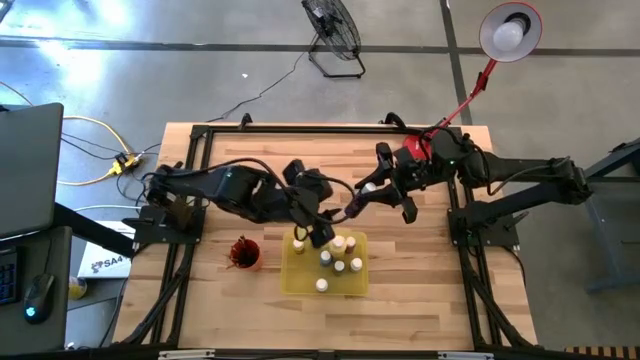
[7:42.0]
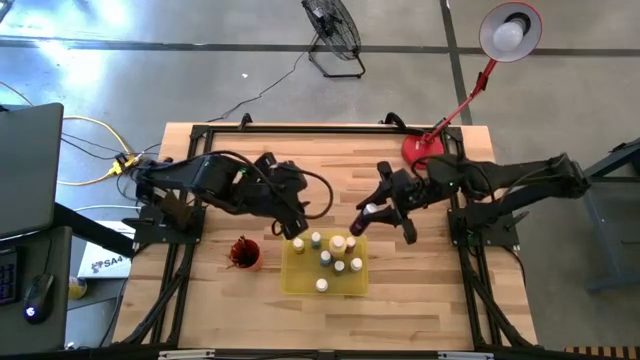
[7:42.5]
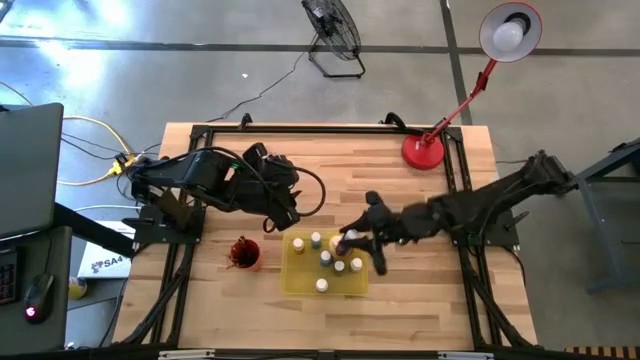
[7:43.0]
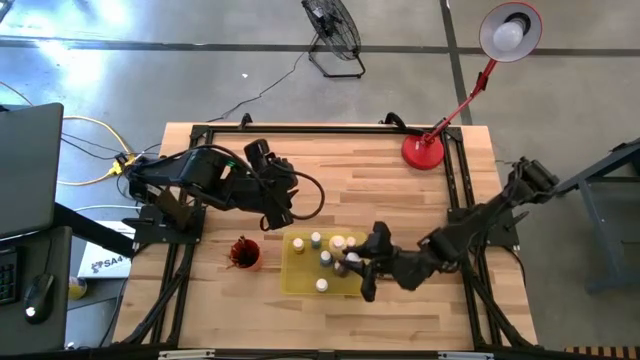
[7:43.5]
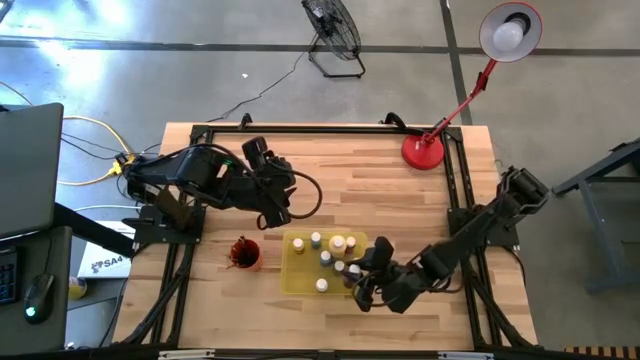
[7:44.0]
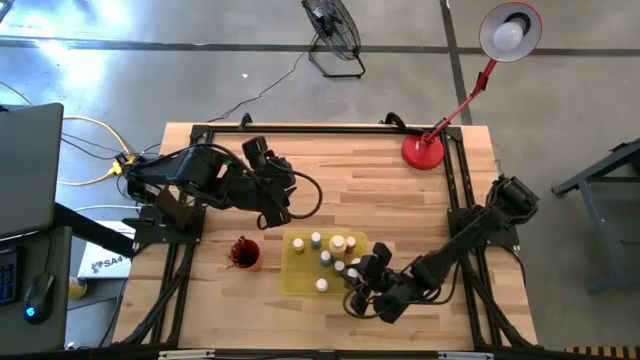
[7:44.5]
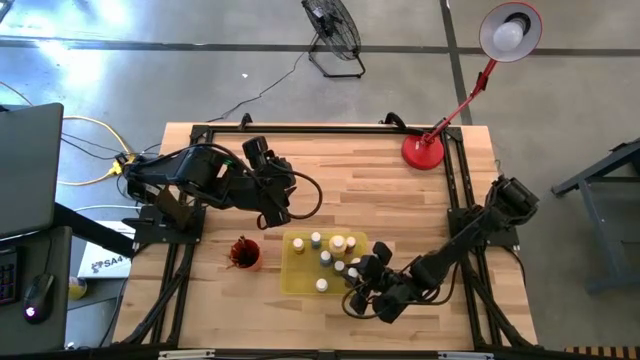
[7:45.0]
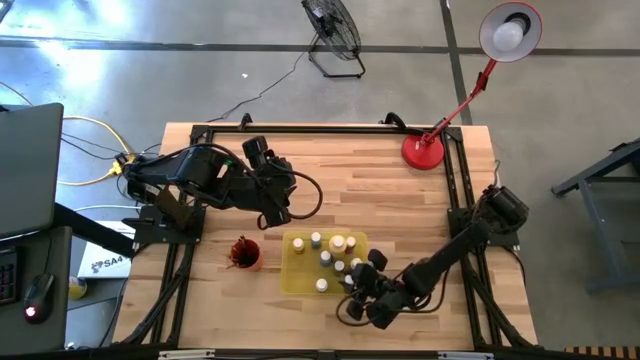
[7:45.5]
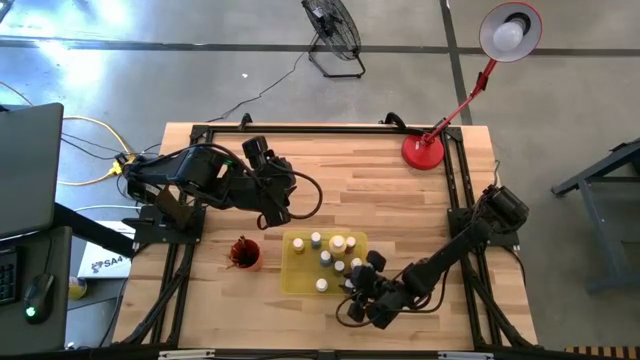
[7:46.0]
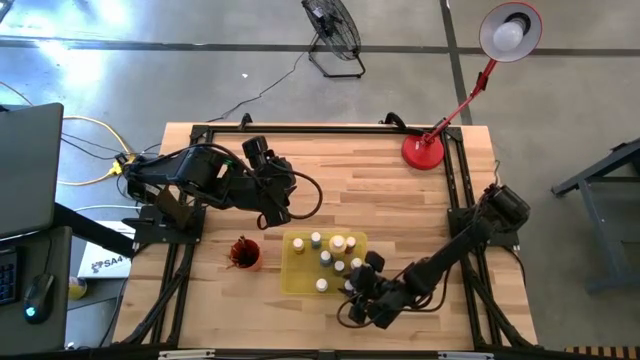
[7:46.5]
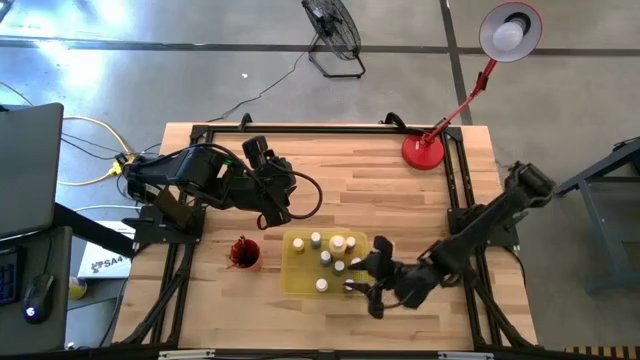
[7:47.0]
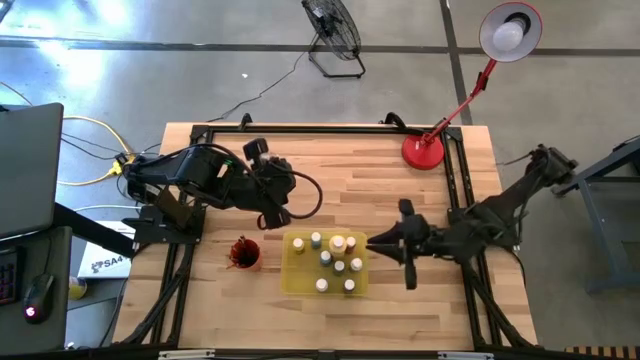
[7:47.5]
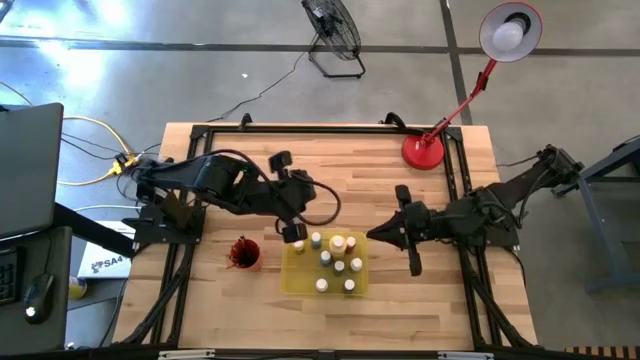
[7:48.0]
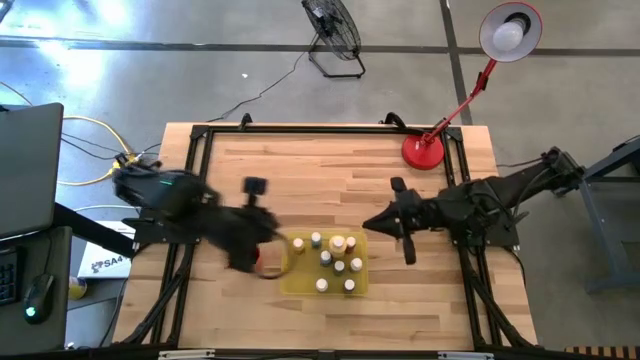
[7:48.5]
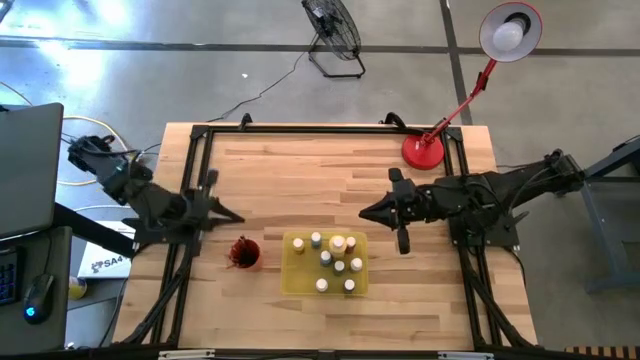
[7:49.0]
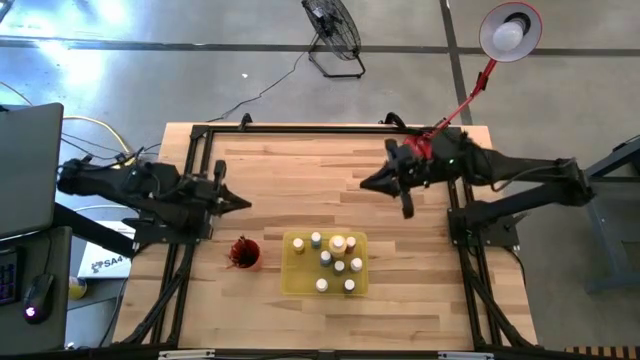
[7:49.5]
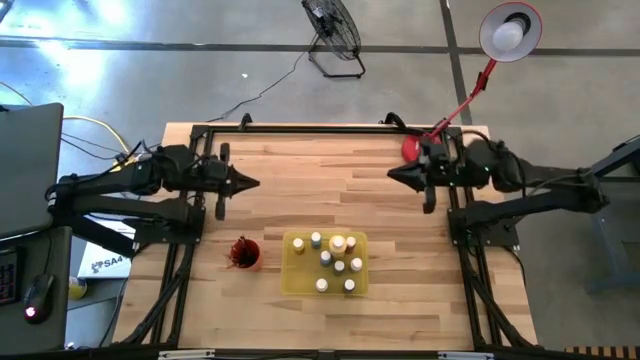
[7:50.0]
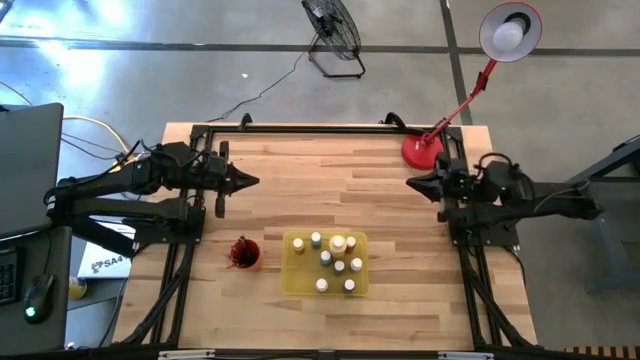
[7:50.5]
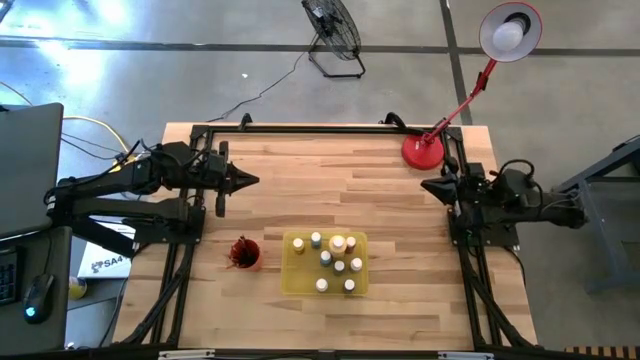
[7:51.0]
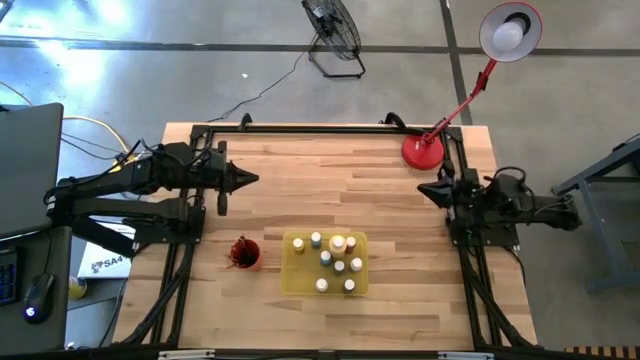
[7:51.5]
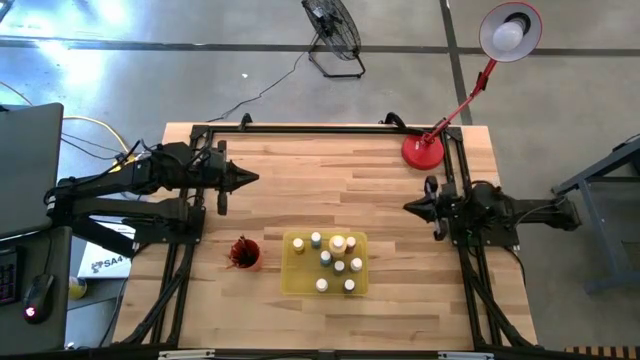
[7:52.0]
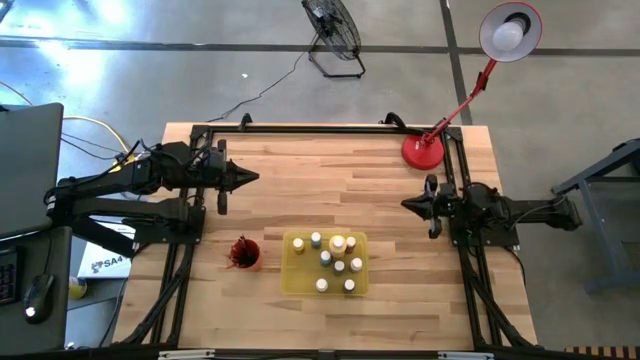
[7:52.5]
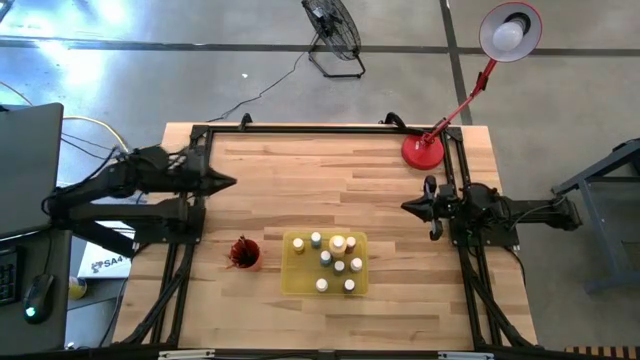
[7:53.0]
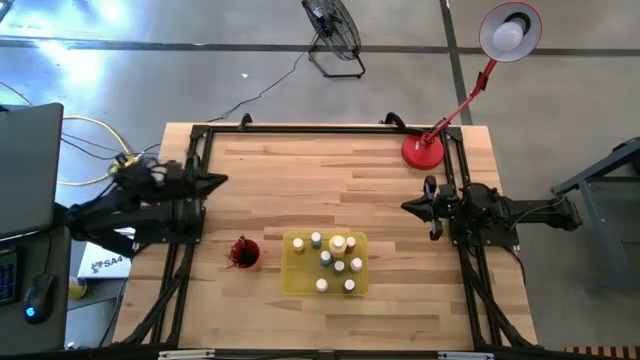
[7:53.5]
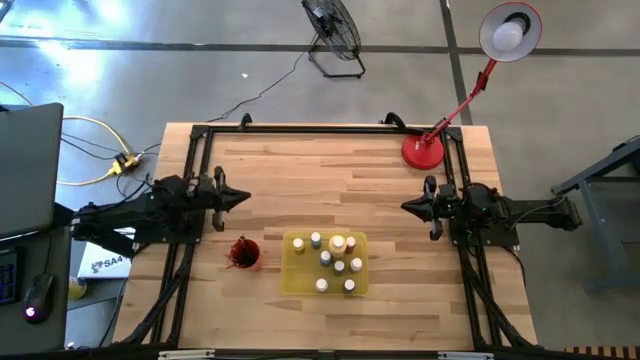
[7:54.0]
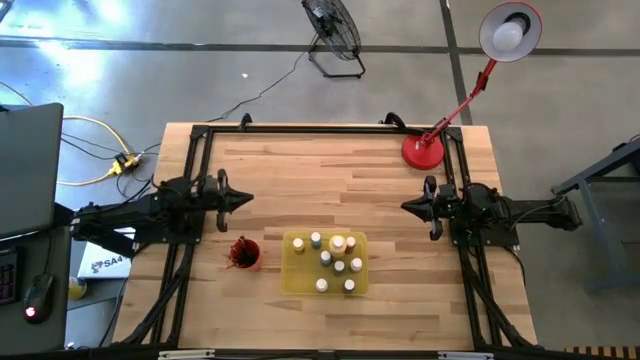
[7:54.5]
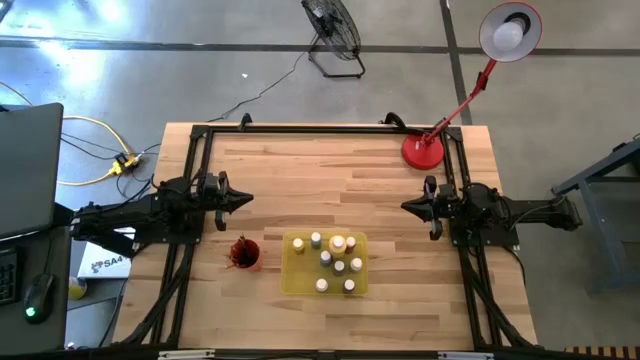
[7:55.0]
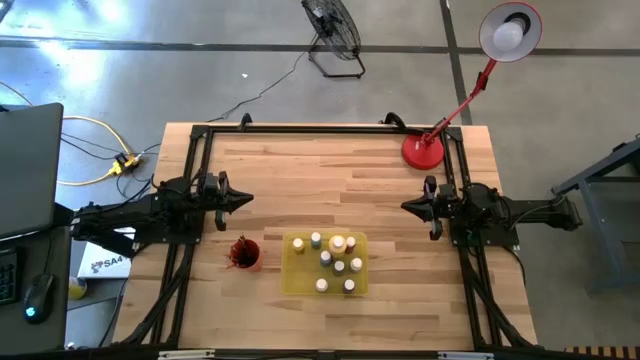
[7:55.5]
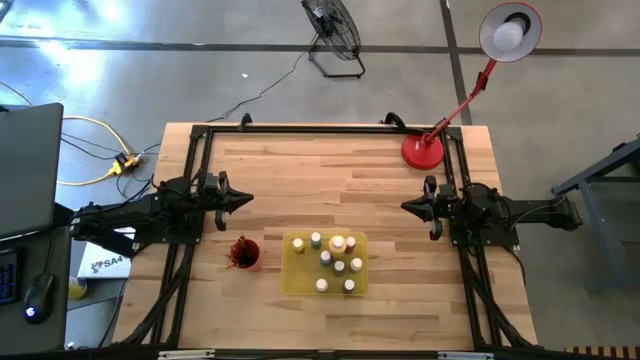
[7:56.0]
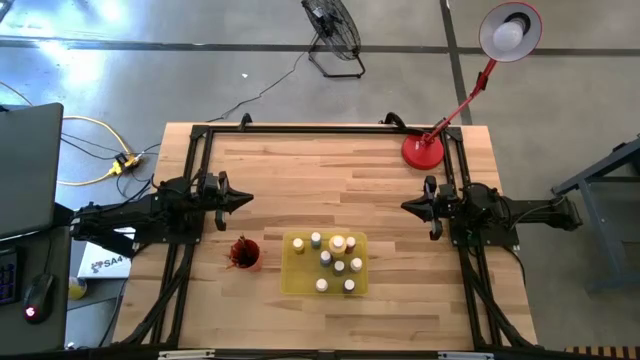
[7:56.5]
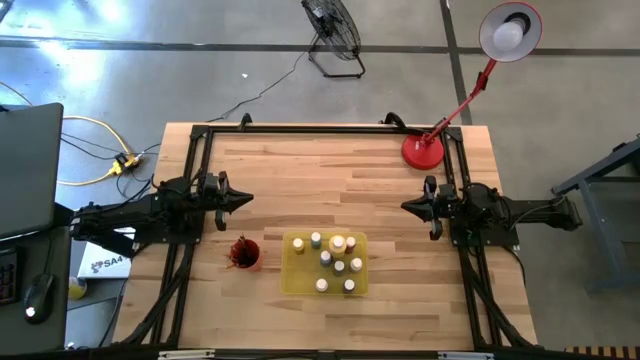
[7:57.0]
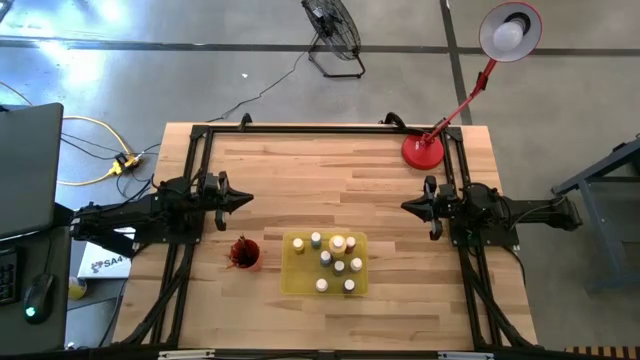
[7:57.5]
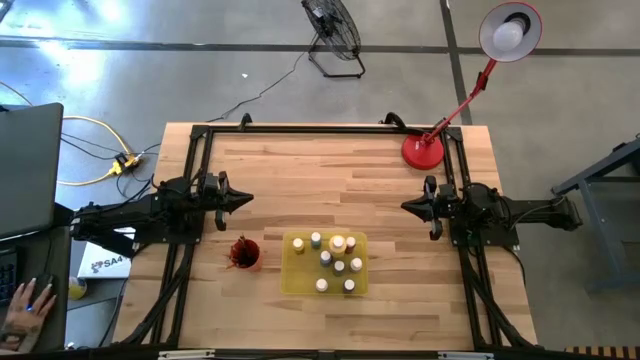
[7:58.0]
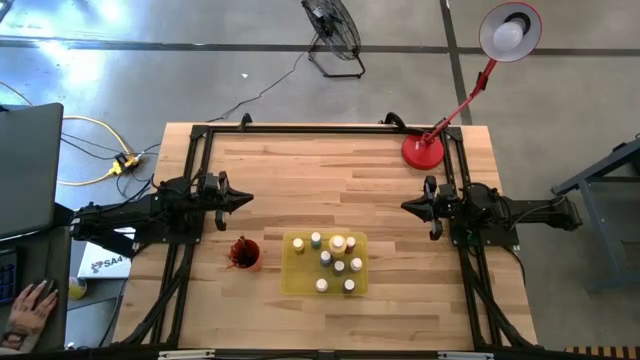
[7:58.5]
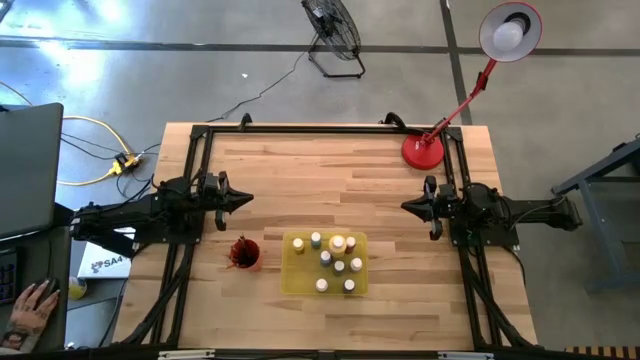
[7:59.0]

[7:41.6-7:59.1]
Task: Pick & Place Paint Supplies
Return to Home Position
